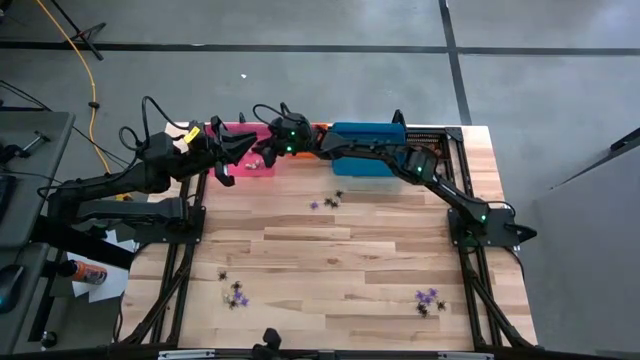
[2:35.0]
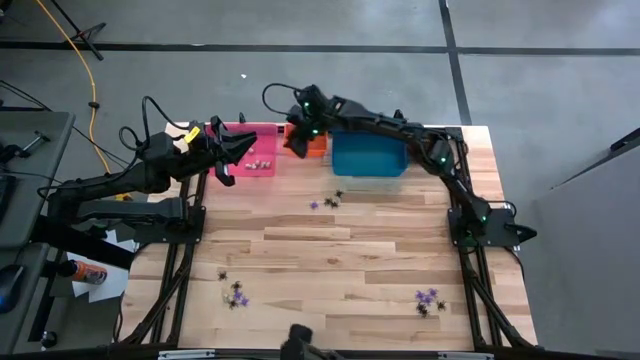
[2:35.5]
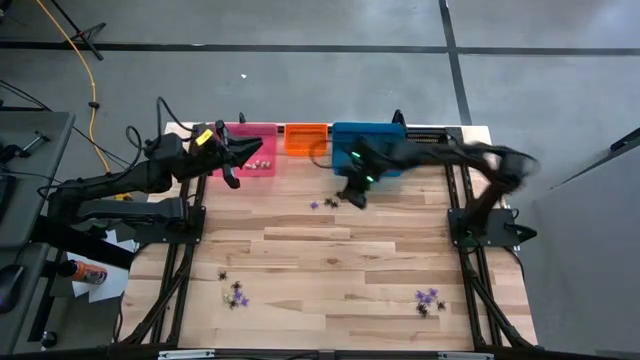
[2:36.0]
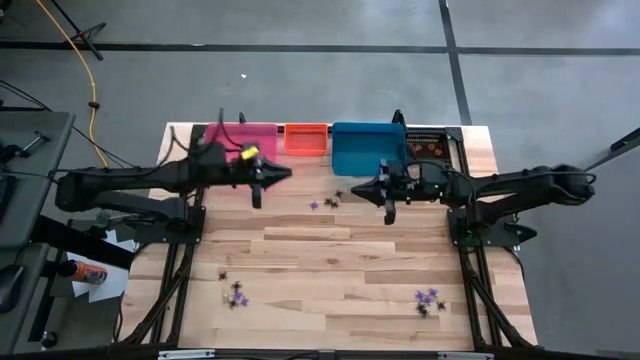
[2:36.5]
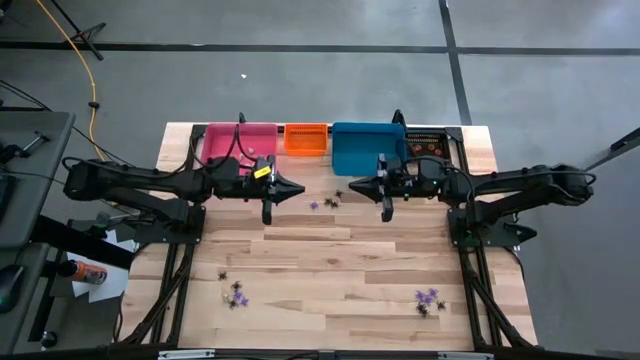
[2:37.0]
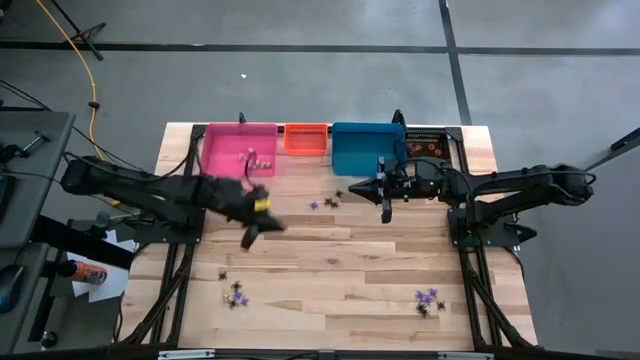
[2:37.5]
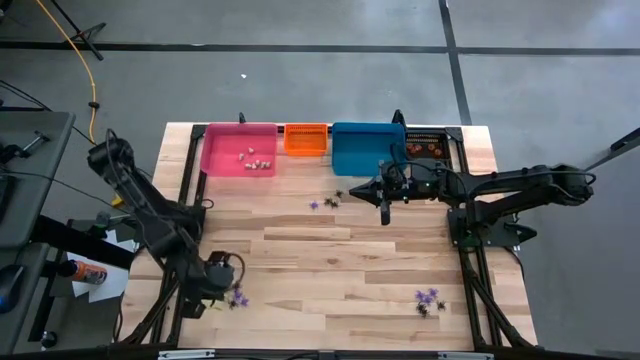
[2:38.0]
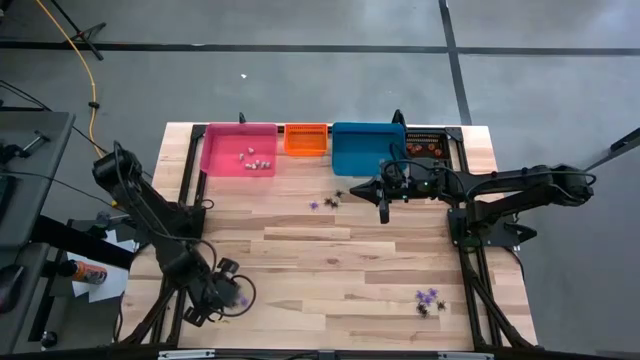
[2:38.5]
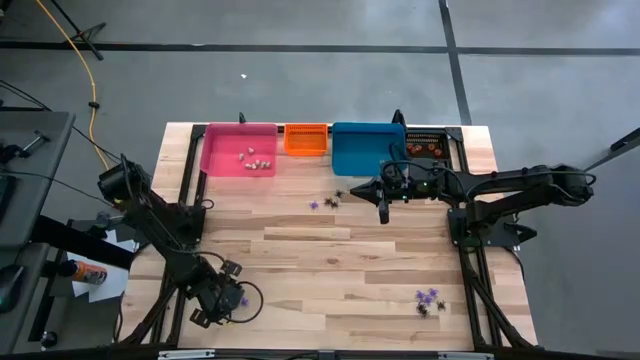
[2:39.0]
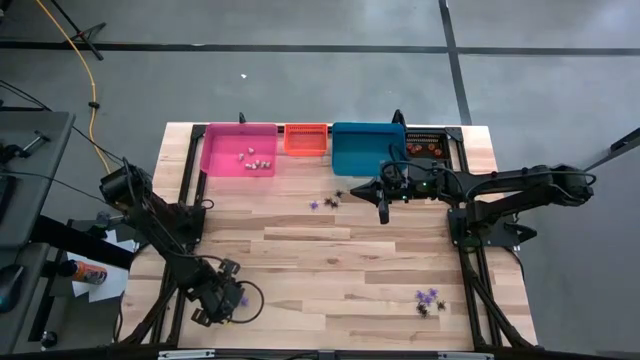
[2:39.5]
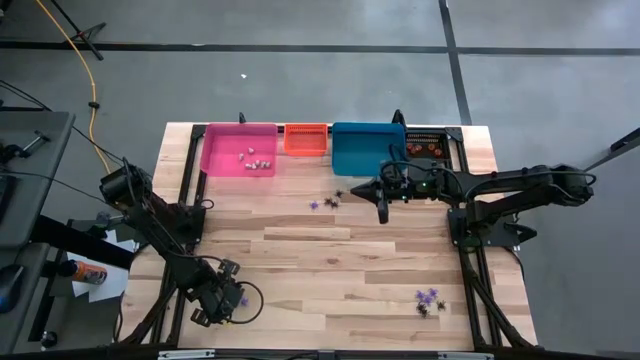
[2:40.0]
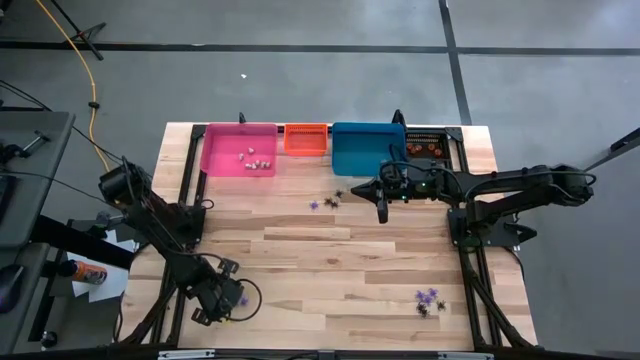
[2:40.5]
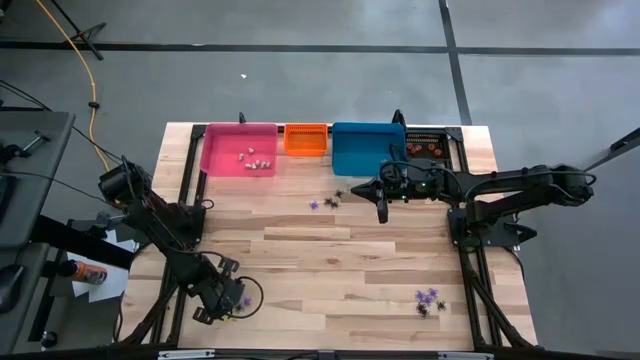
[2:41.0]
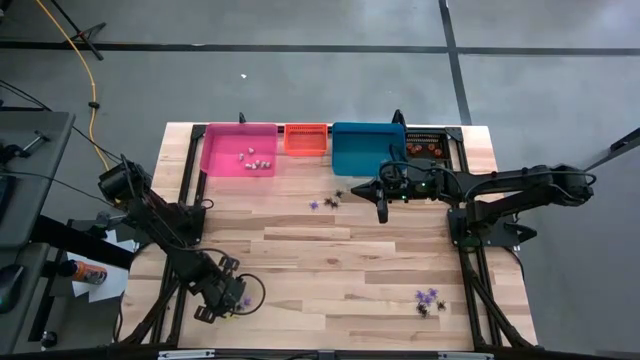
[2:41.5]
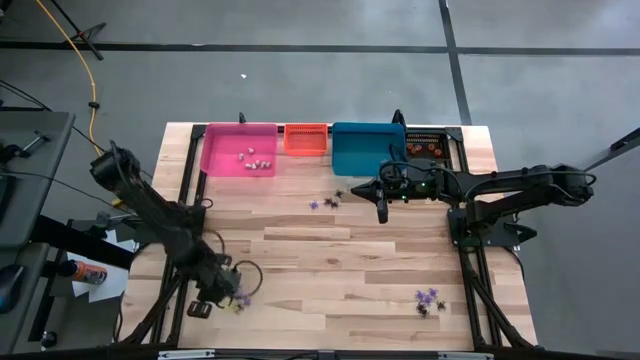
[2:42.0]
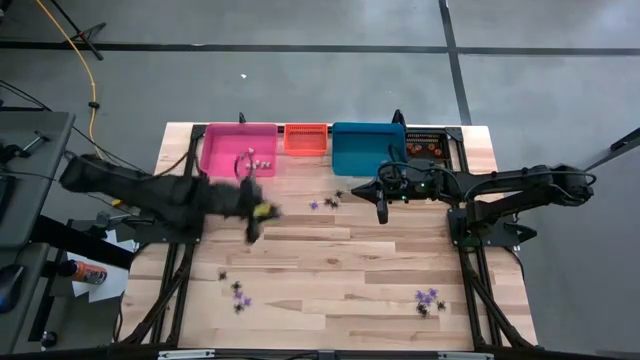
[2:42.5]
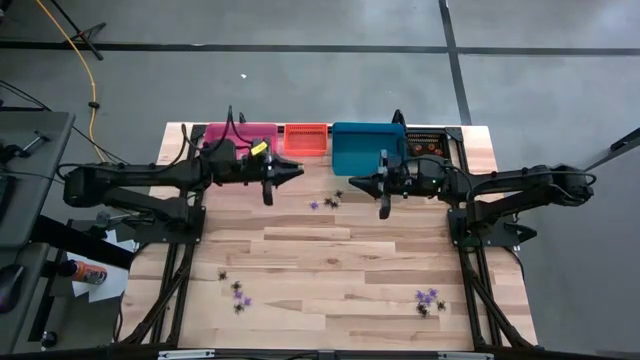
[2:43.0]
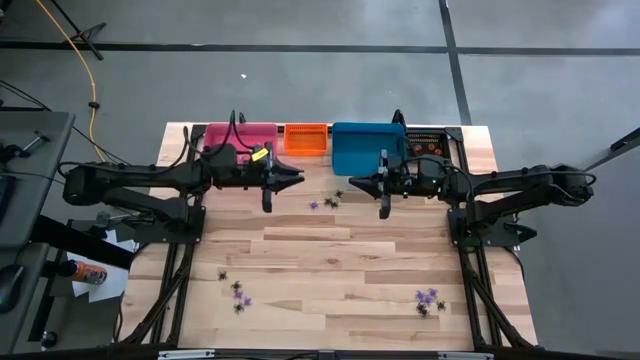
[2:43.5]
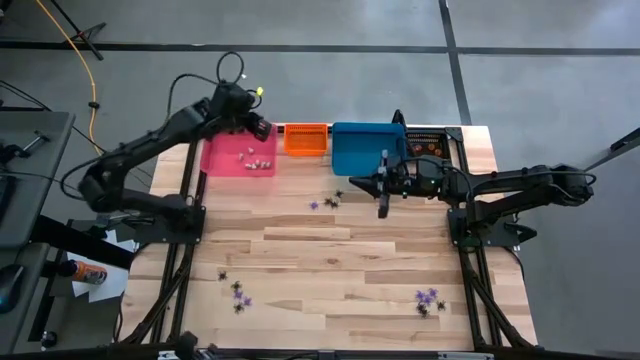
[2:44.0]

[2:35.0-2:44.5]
Task: Sort Halloween decoration
Put the white skull toy into the pink bin

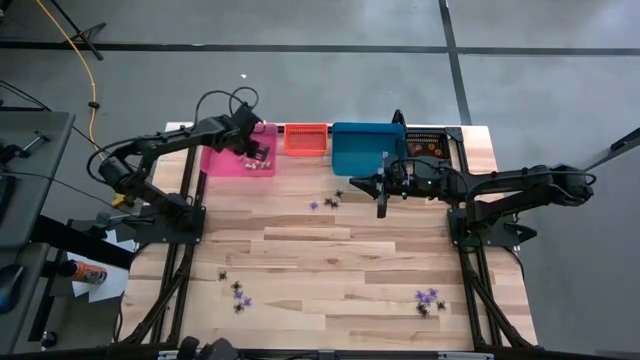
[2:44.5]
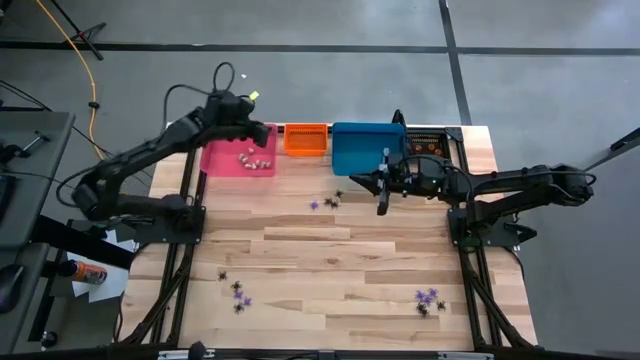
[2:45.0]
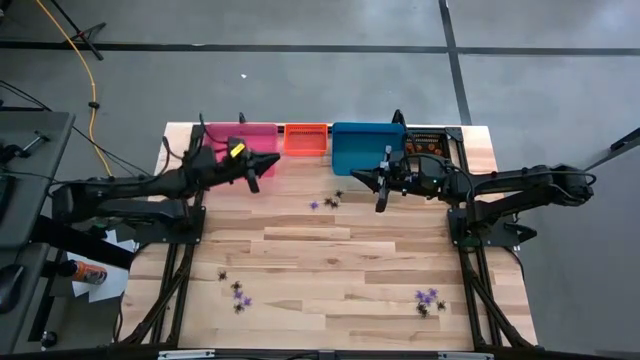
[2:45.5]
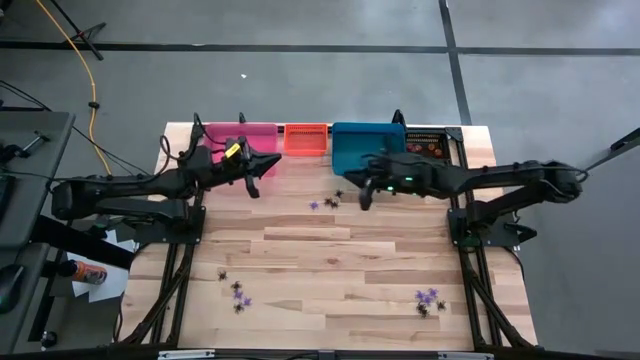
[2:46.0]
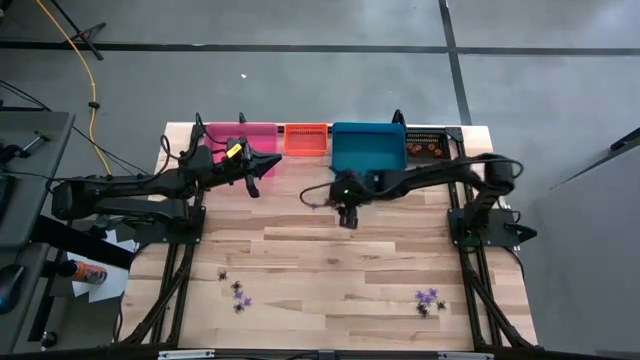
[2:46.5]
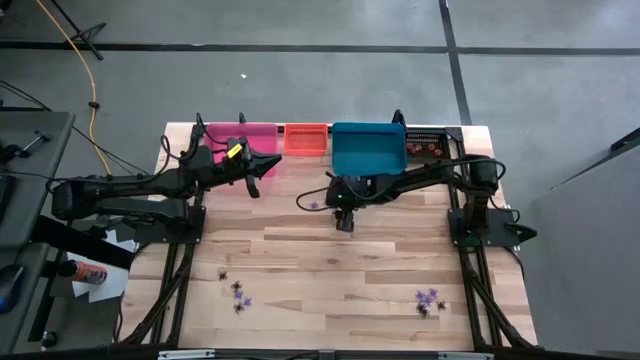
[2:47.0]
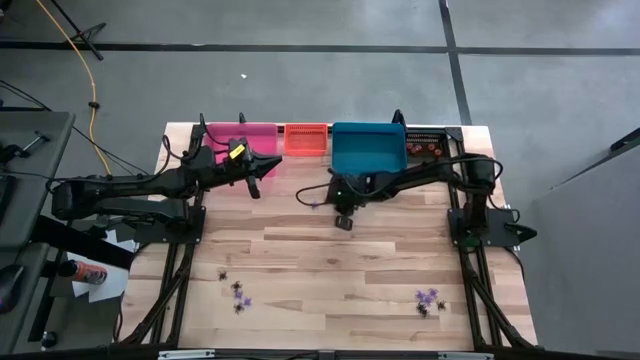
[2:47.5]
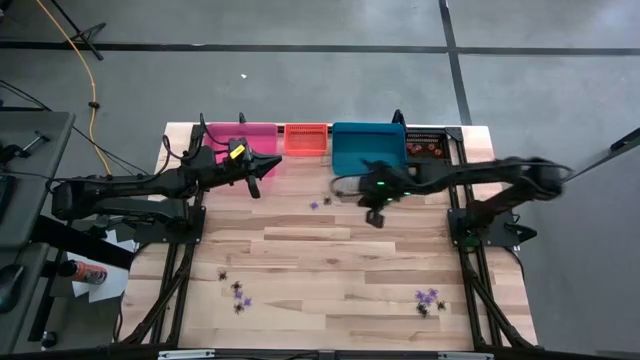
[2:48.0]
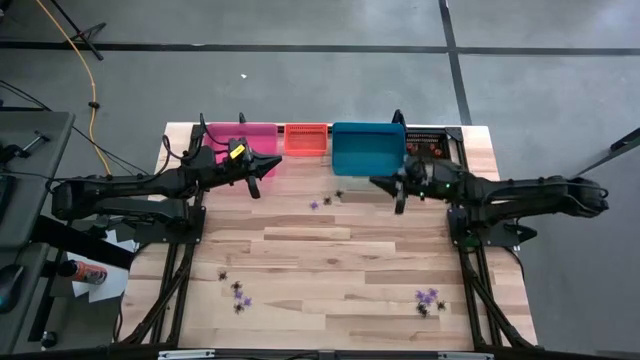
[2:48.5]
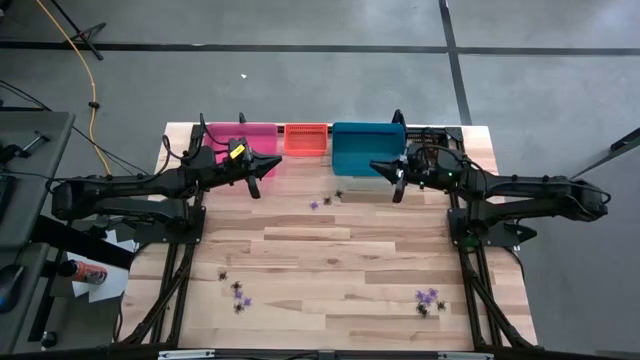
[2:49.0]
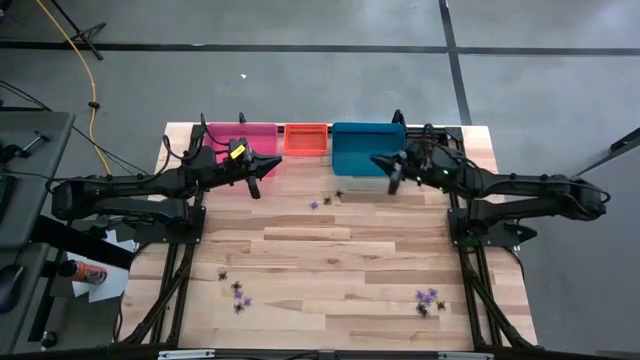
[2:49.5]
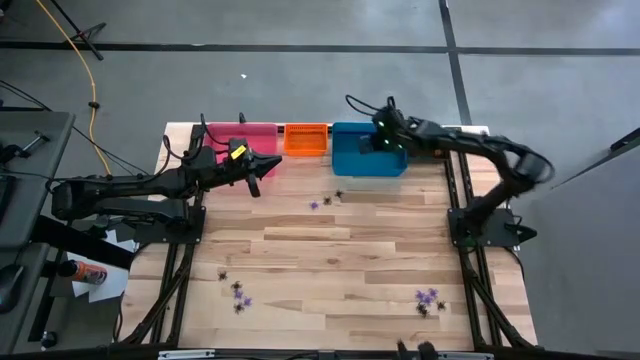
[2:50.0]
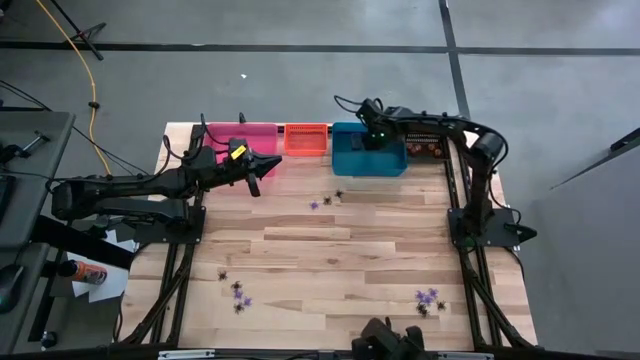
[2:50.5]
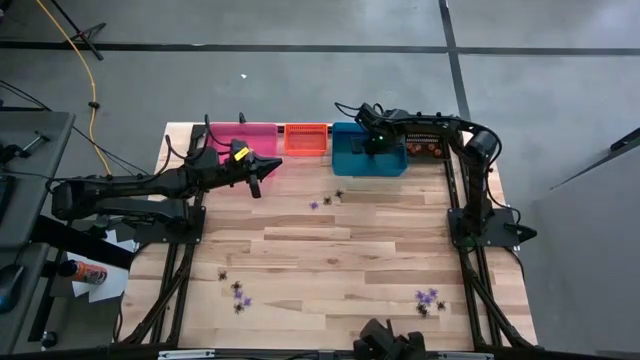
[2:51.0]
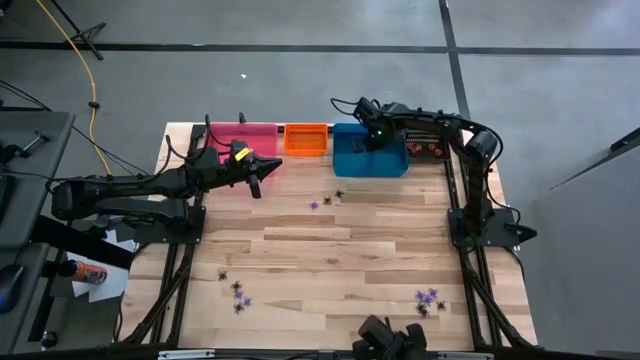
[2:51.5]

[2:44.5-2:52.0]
Put the black spider toy into the blue bin

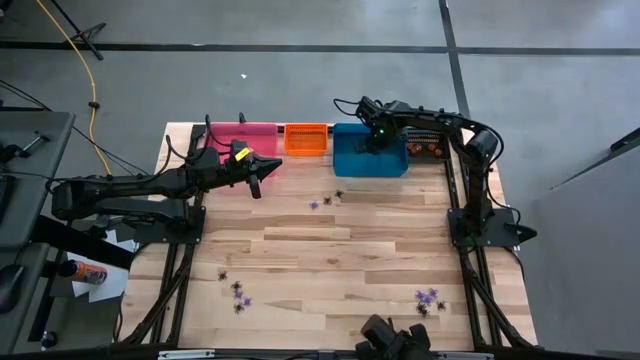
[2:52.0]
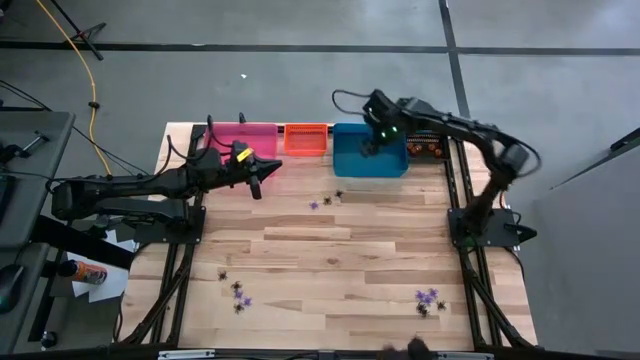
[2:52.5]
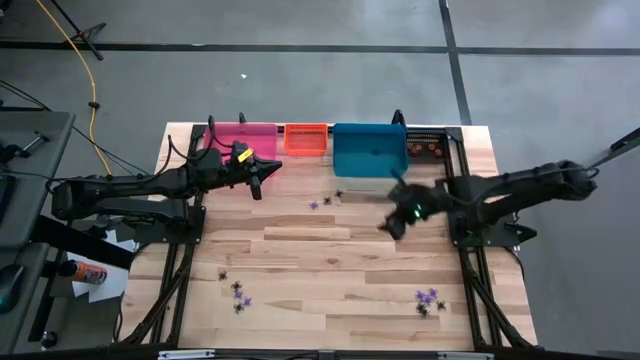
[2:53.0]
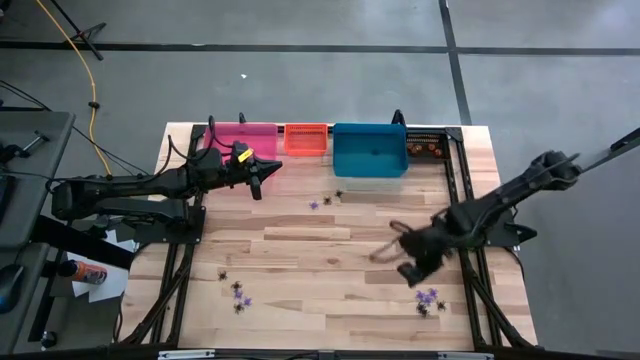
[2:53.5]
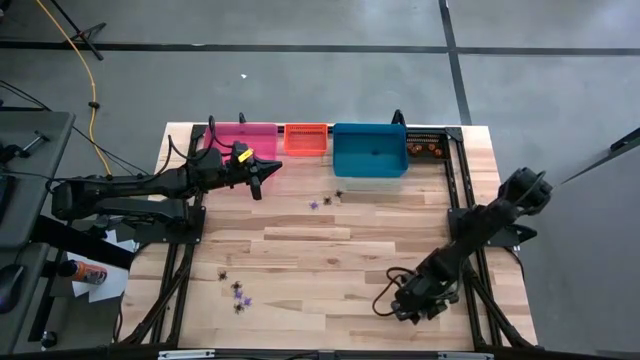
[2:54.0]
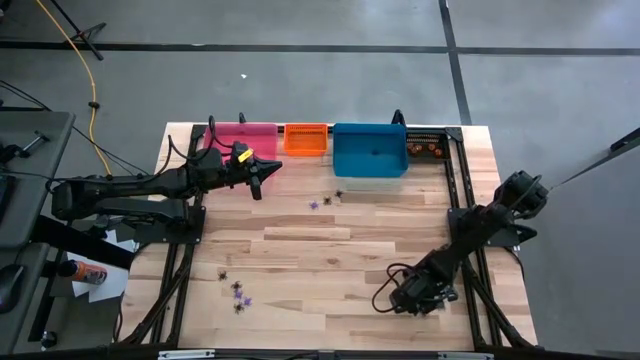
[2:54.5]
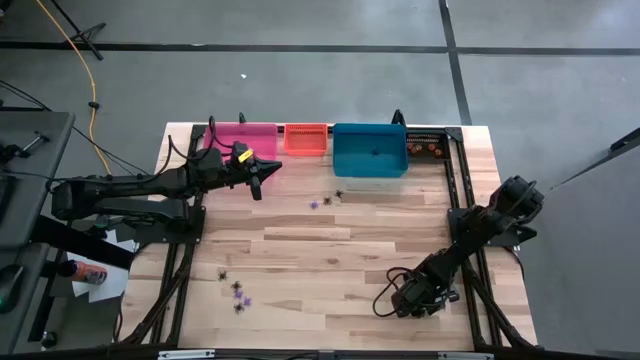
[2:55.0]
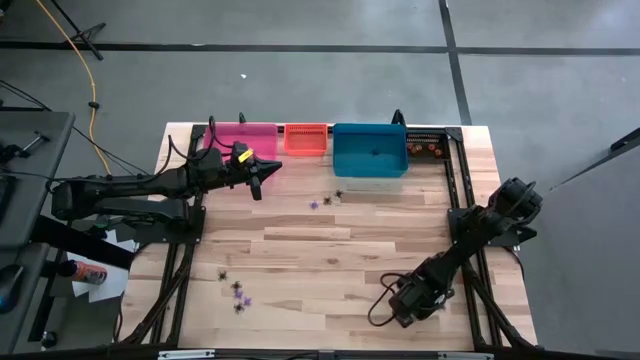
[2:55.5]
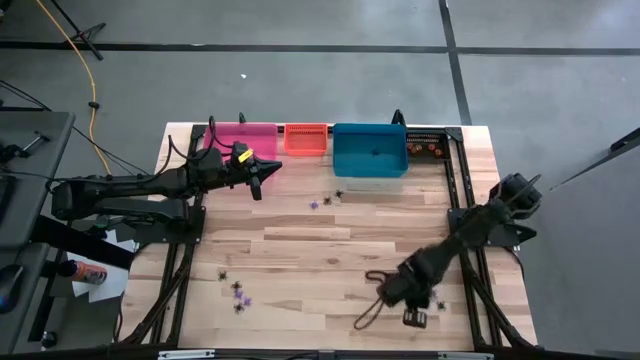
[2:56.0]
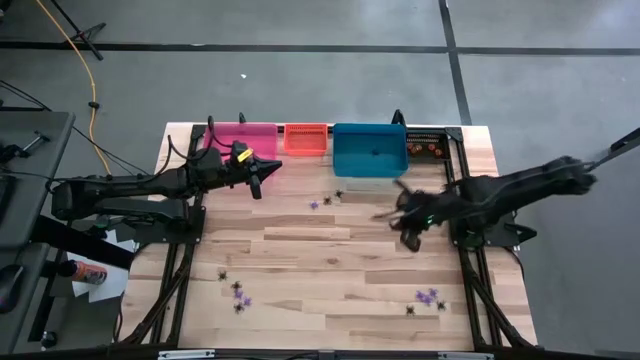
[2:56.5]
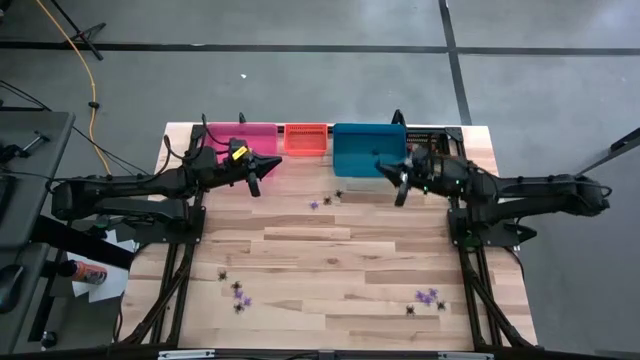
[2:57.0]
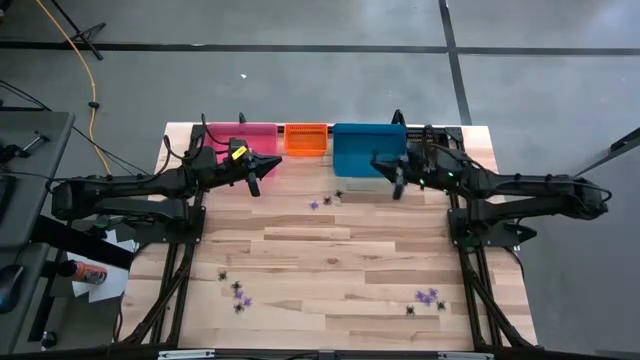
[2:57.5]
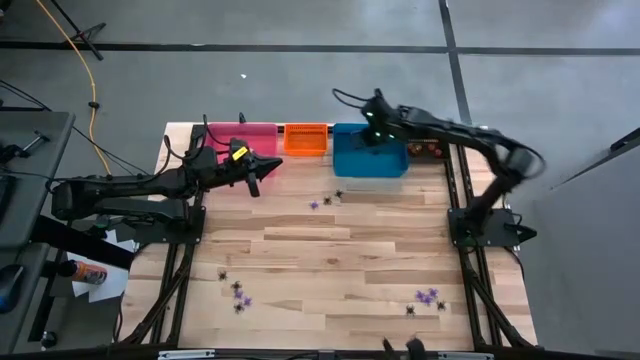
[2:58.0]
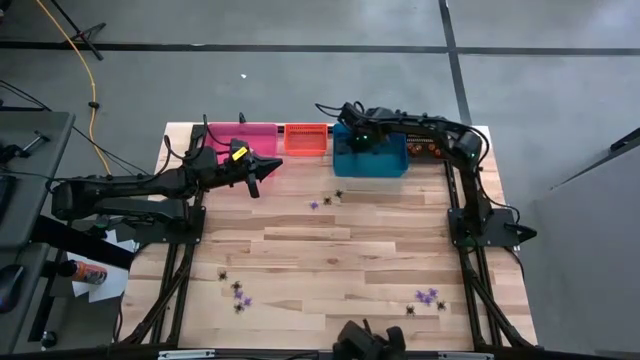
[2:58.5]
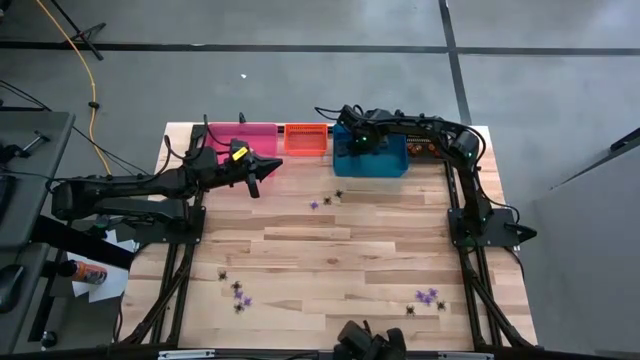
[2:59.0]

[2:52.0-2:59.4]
Put the black spider toy into the blue bin
